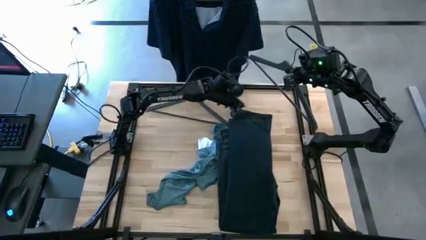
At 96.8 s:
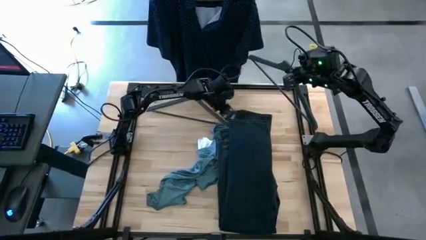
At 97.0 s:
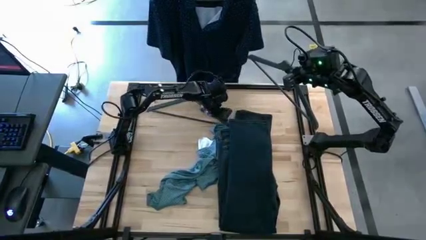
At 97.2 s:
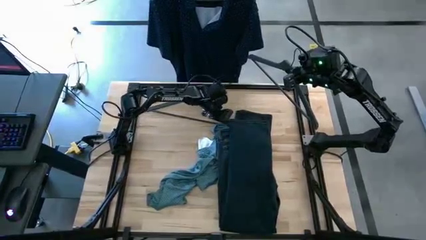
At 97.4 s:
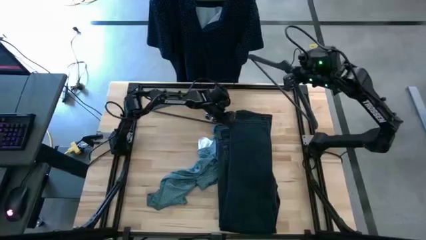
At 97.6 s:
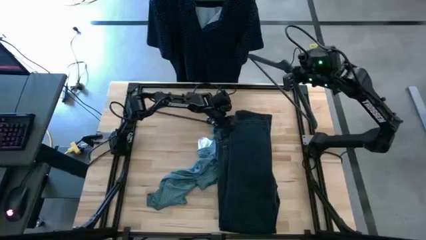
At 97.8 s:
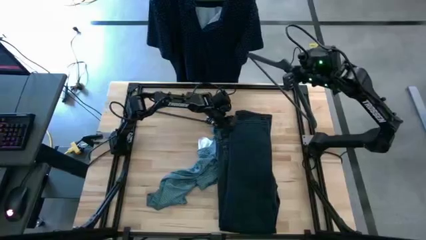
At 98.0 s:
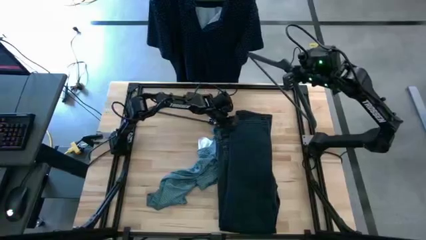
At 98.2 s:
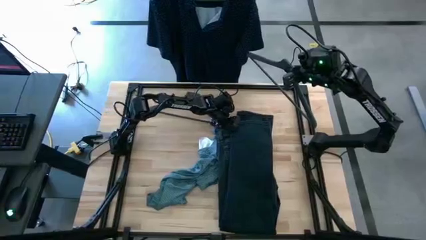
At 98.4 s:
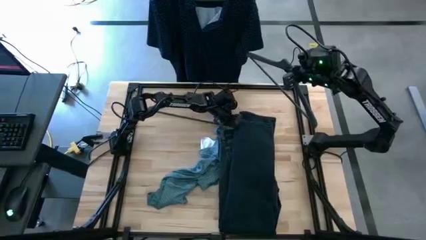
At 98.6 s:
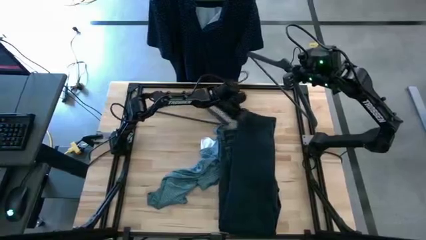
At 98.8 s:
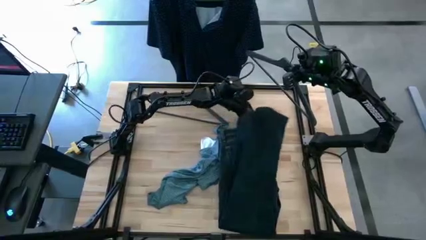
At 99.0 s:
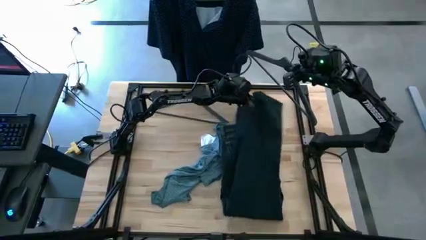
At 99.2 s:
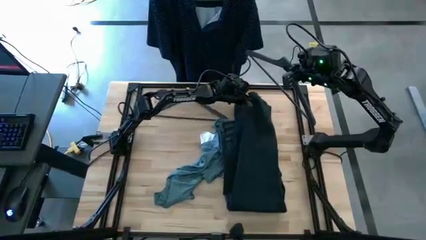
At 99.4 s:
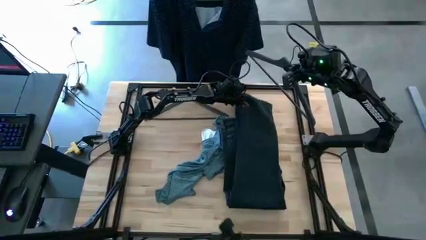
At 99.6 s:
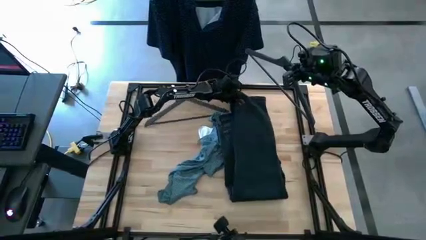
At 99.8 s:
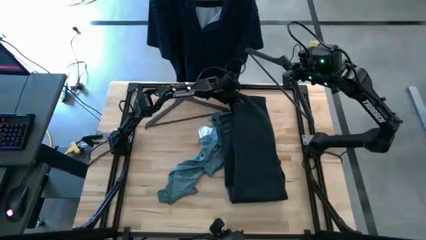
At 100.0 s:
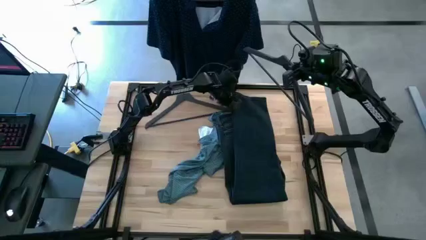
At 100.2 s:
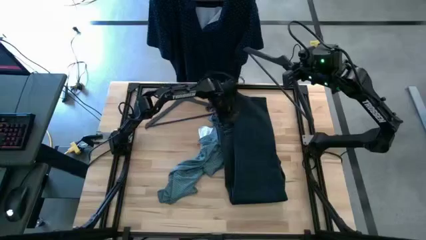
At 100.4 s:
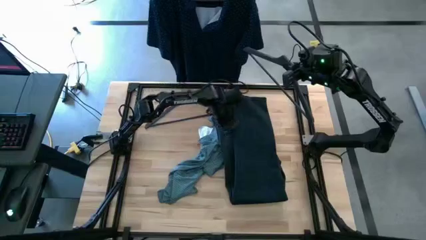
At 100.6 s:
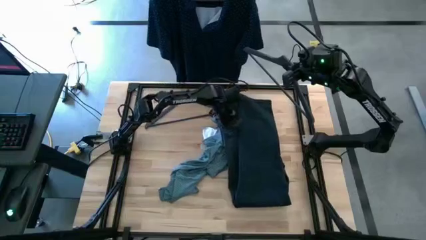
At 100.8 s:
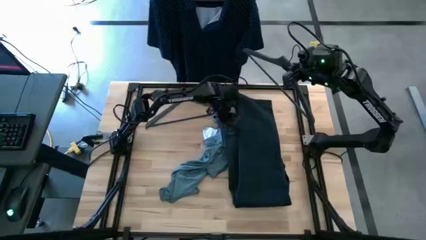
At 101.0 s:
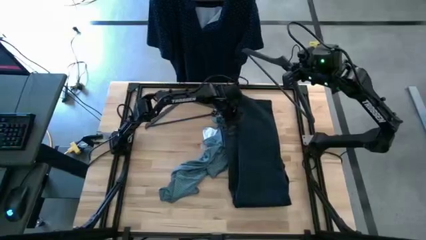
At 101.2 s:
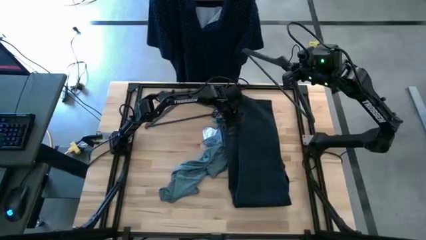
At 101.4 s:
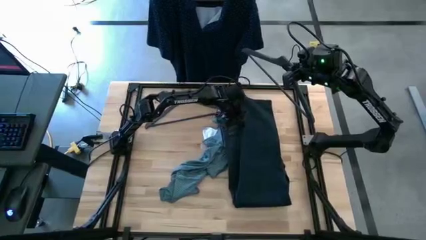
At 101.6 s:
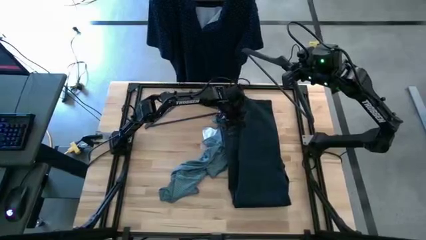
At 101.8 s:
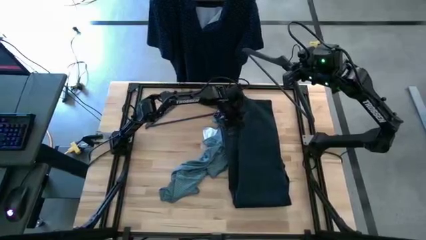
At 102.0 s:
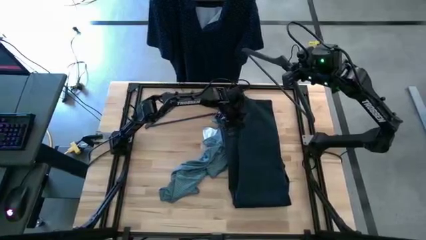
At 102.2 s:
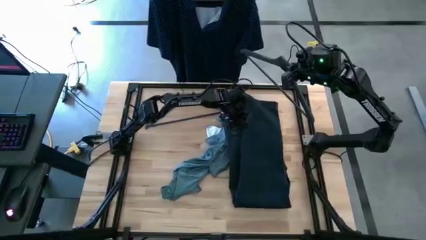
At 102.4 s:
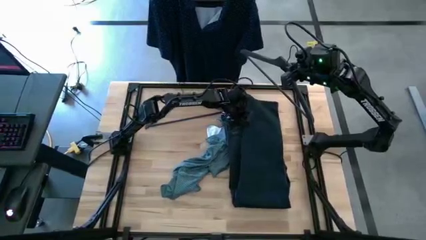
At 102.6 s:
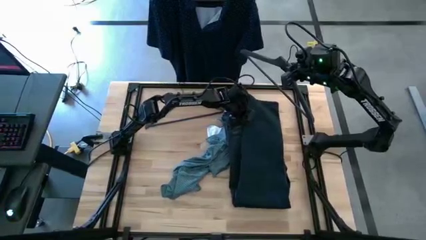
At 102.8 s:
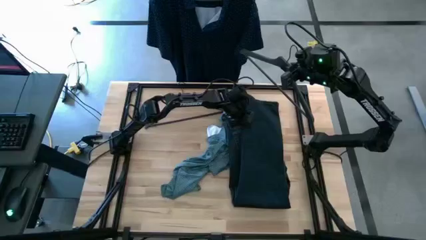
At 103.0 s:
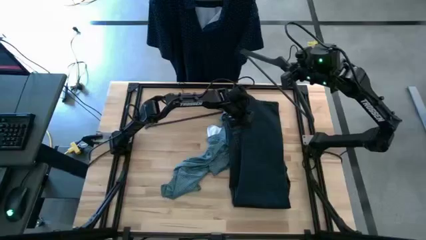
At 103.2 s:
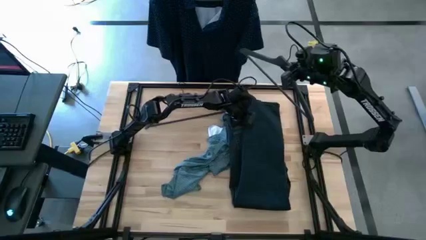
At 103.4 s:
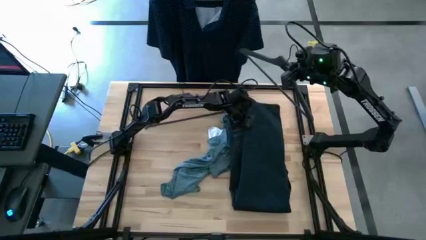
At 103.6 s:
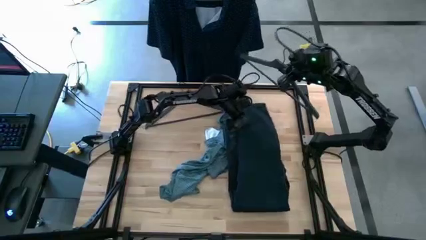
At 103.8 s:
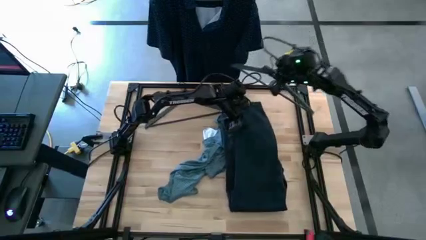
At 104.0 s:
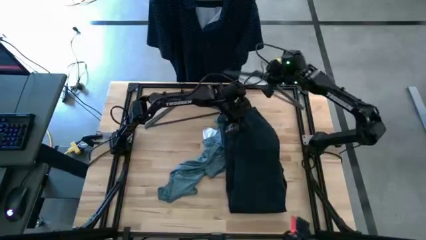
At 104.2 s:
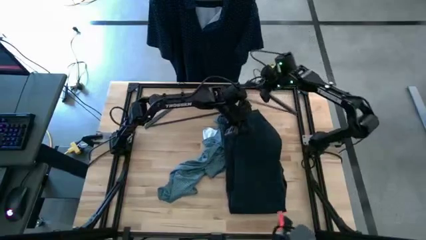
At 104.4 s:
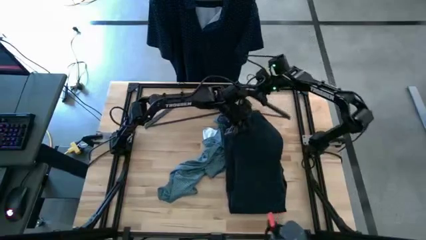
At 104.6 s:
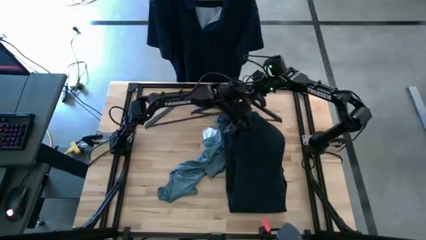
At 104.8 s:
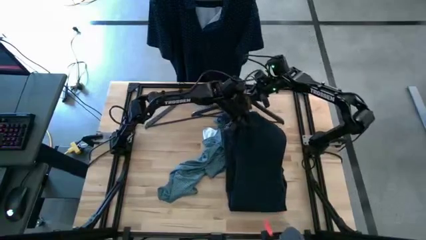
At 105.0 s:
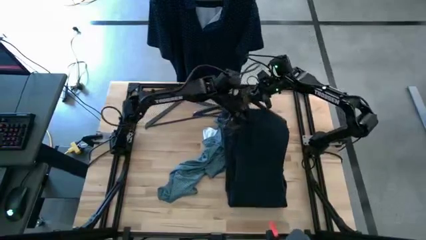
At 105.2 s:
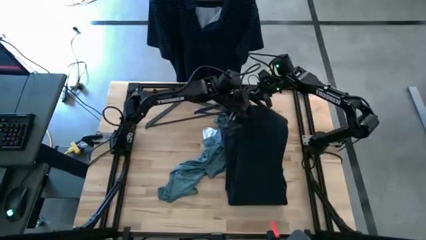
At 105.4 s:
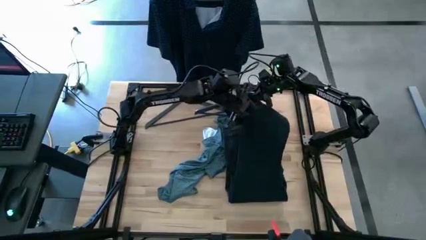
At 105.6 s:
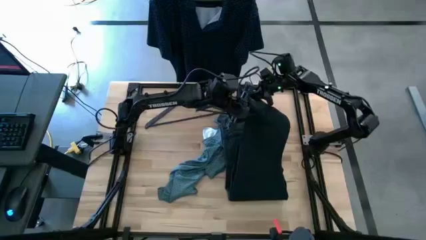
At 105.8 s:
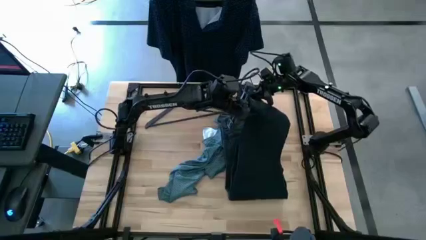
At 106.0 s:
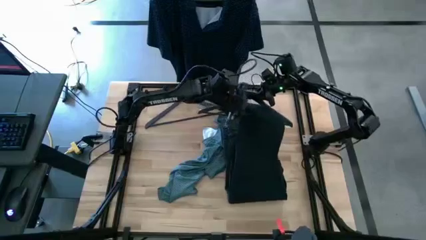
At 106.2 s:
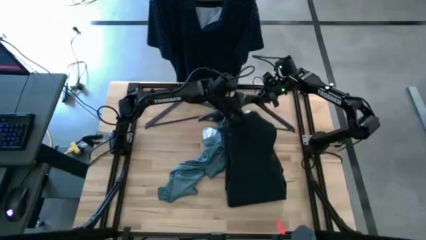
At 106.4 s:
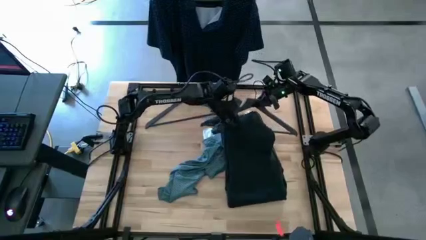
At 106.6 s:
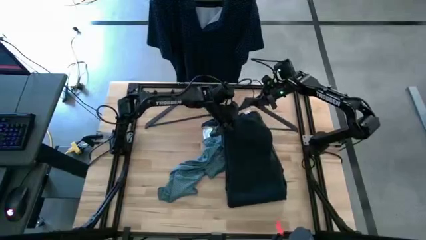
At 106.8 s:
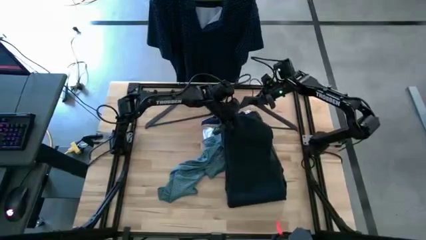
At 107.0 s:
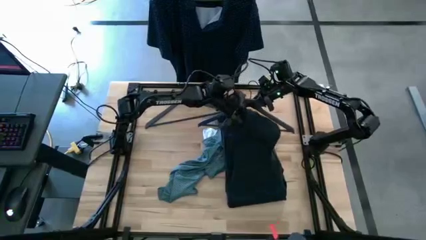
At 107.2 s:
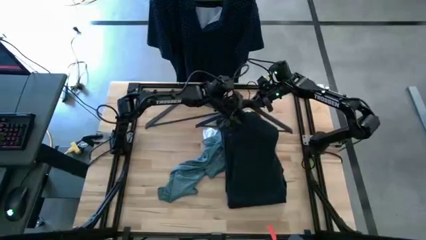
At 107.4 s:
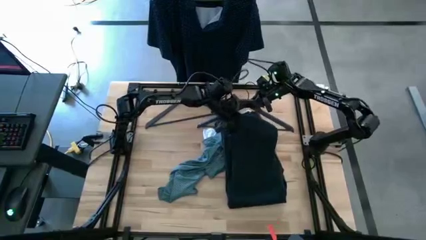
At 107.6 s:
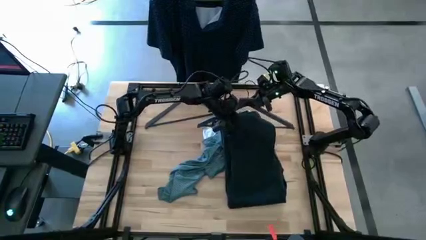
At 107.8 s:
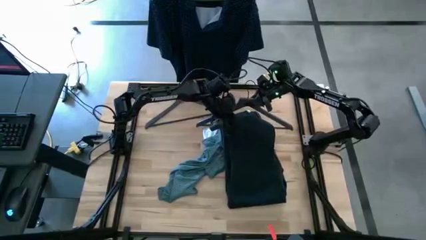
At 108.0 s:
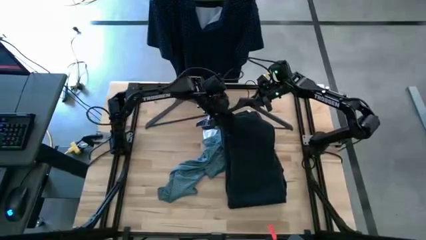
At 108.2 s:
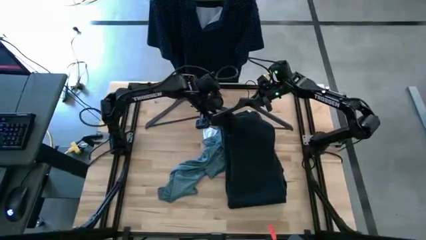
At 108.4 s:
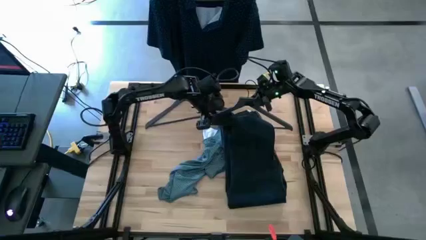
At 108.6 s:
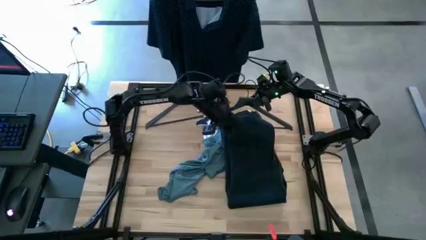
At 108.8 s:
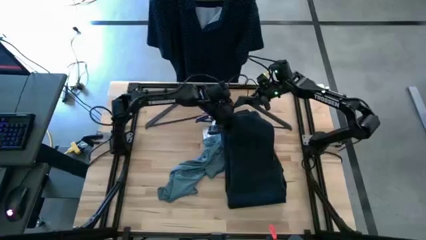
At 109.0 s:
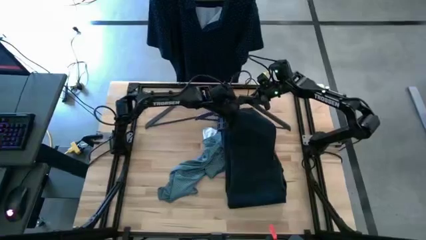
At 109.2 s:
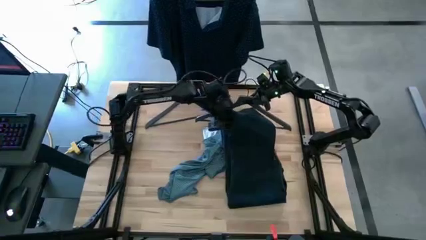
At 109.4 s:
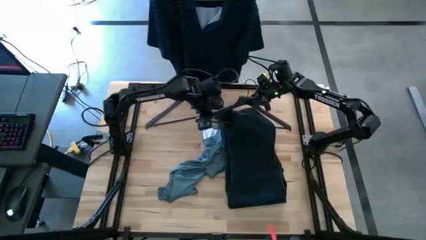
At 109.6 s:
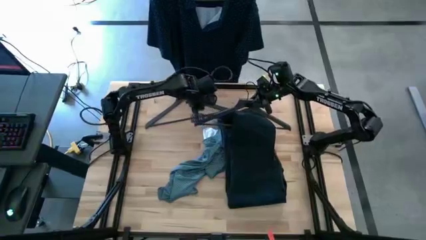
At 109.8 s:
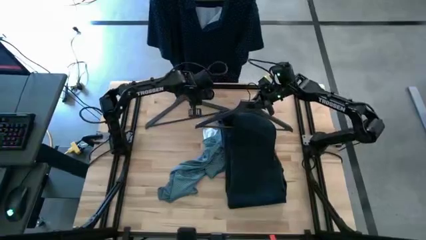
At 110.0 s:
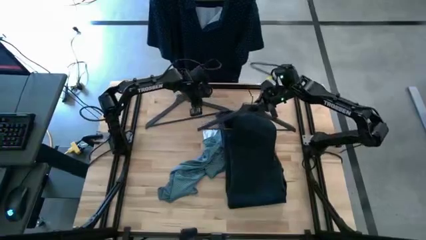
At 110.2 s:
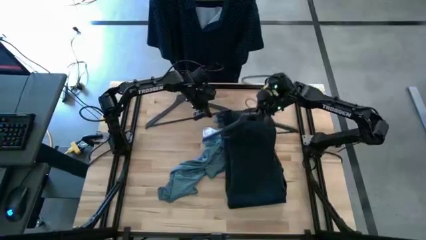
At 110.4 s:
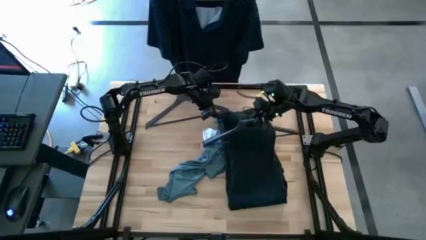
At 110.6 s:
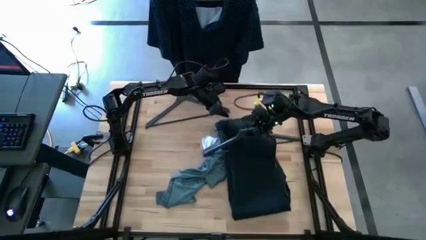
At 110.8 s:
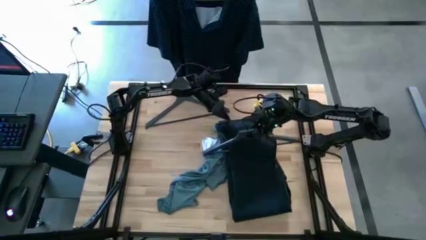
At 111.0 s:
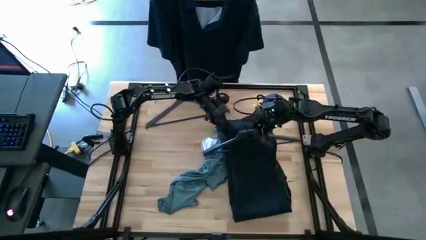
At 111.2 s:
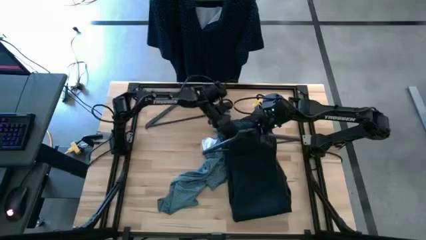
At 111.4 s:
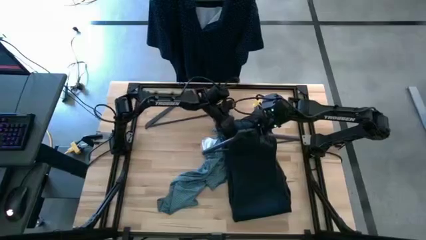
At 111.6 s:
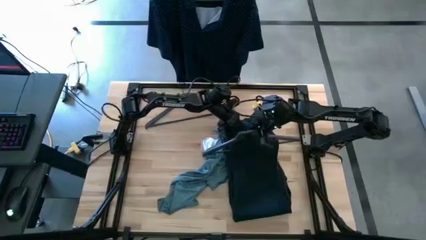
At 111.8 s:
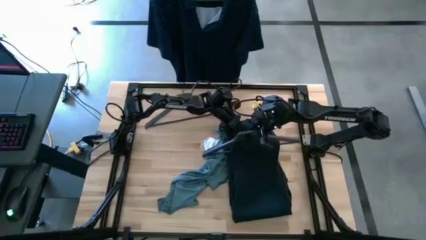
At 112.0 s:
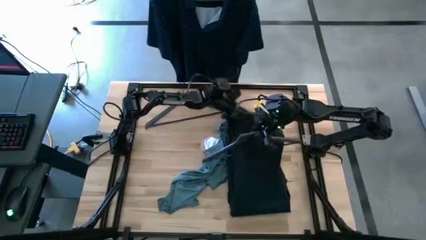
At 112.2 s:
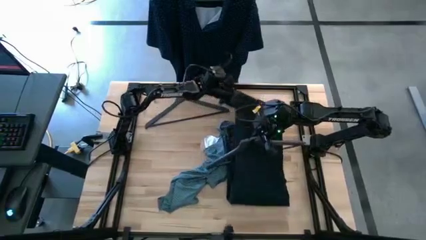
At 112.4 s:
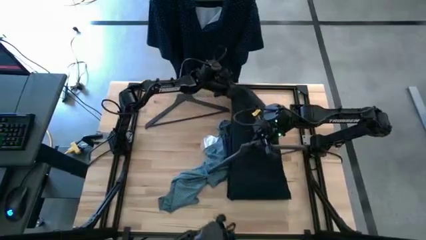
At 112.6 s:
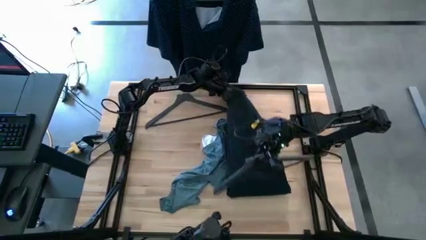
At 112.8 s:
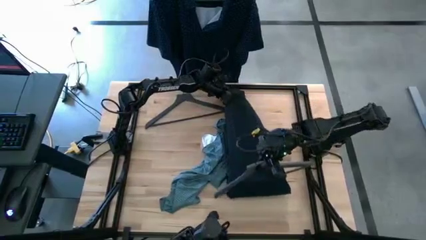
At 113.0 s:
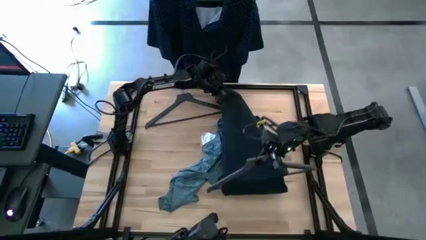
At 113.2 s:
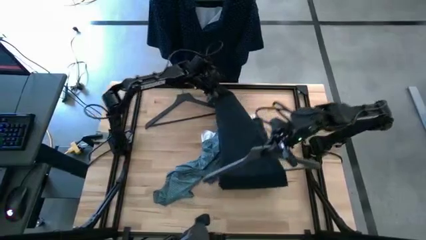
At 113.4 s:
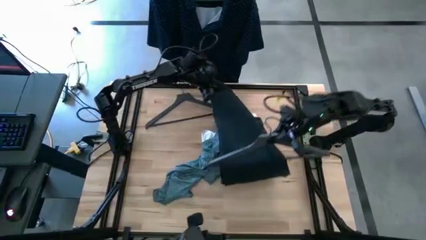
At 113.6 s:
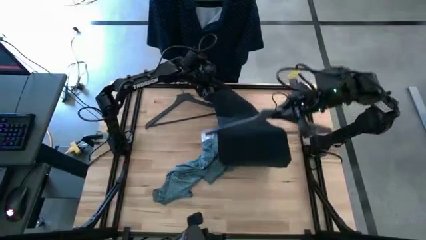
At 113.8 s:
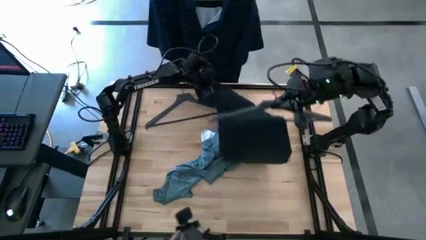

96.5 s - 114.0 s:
Task: Hang clothes
Insert the hanger into the blue pants
